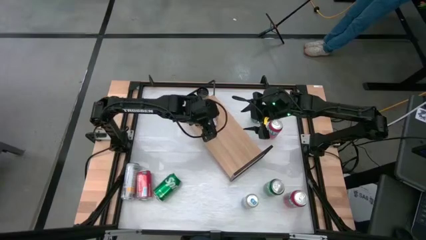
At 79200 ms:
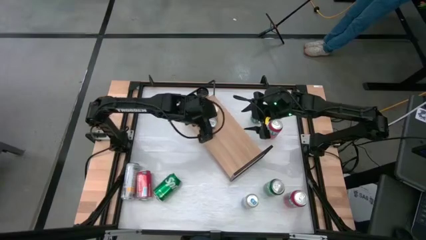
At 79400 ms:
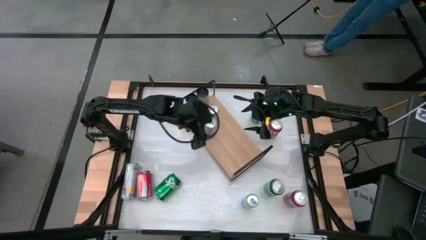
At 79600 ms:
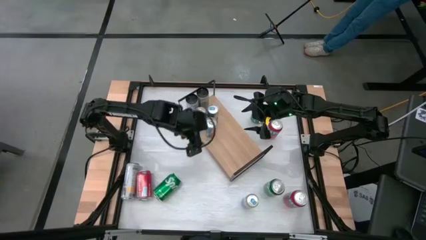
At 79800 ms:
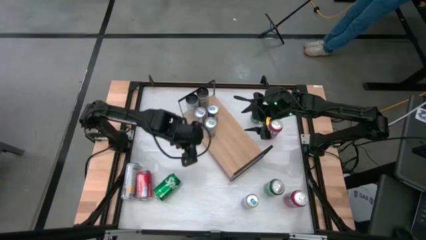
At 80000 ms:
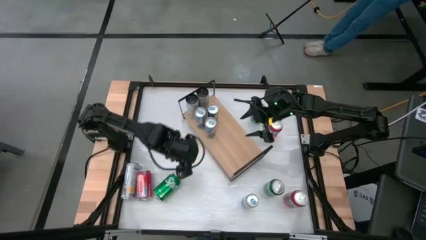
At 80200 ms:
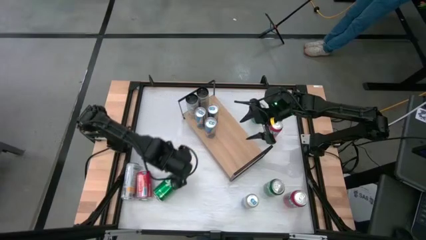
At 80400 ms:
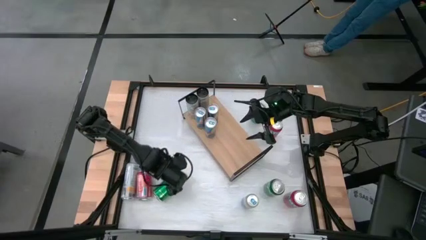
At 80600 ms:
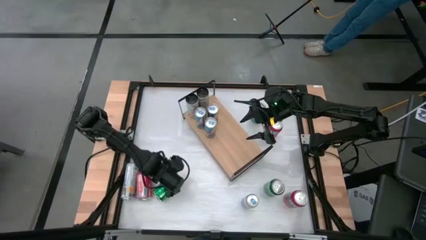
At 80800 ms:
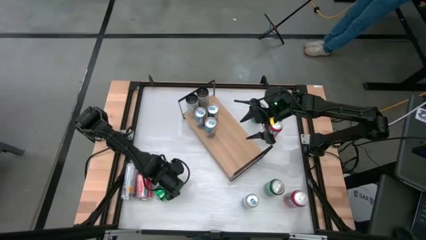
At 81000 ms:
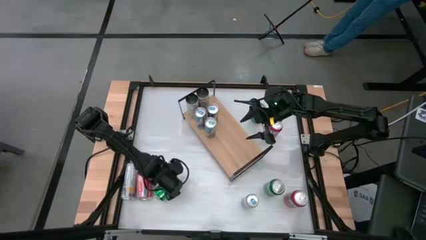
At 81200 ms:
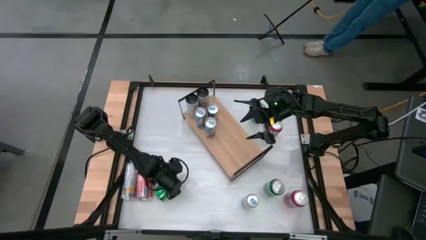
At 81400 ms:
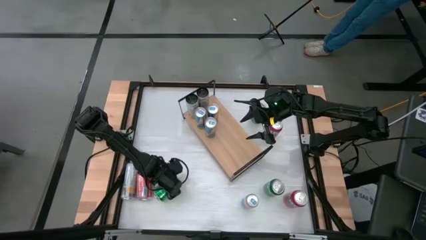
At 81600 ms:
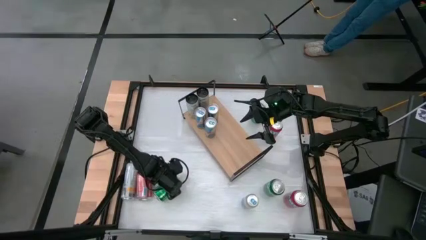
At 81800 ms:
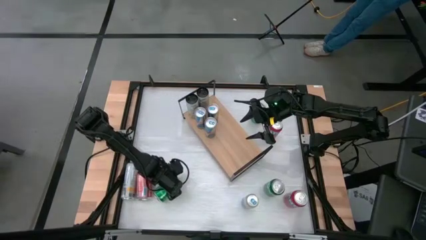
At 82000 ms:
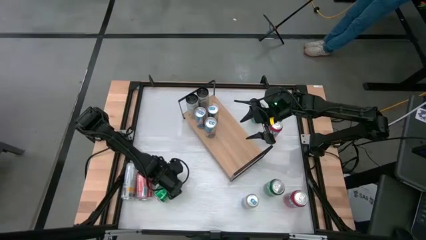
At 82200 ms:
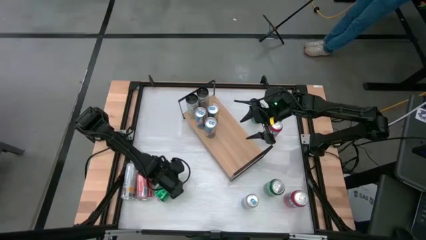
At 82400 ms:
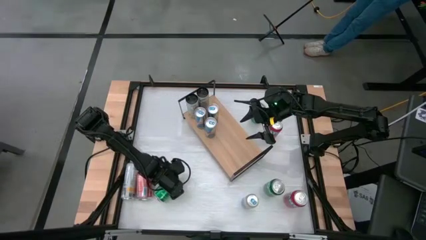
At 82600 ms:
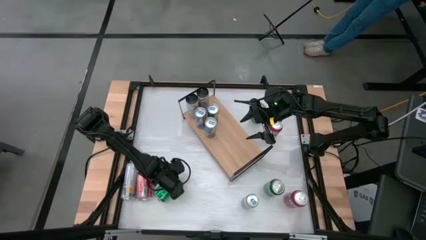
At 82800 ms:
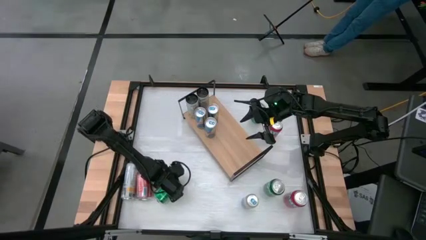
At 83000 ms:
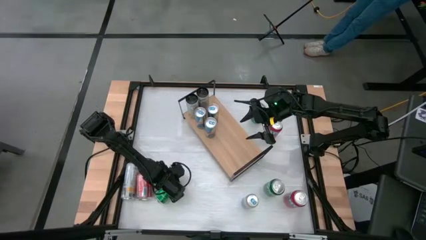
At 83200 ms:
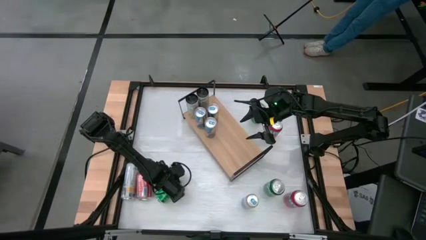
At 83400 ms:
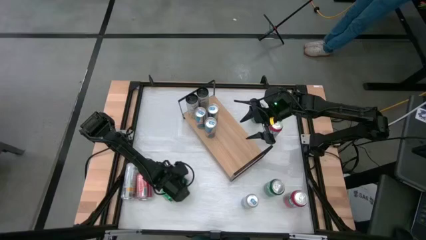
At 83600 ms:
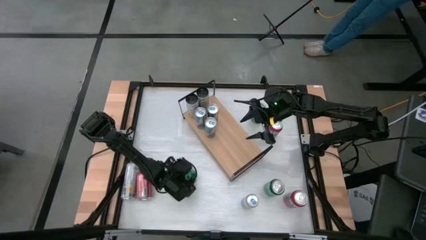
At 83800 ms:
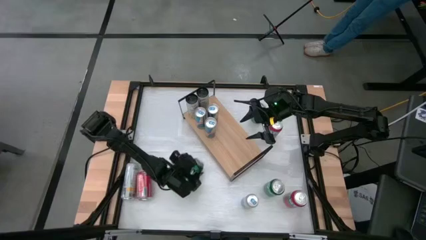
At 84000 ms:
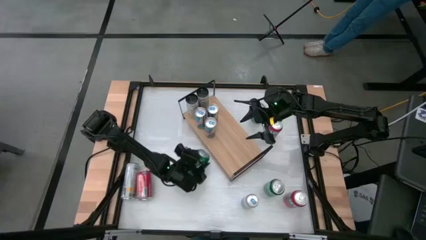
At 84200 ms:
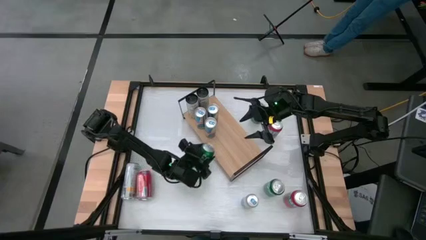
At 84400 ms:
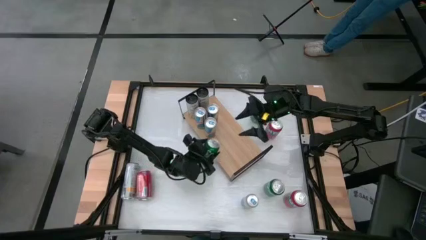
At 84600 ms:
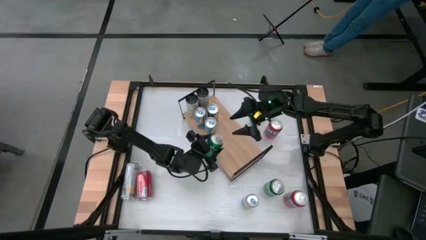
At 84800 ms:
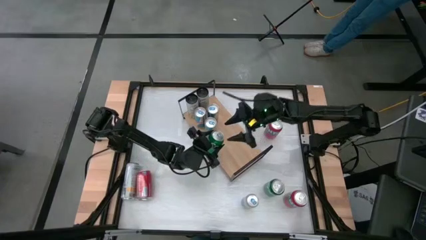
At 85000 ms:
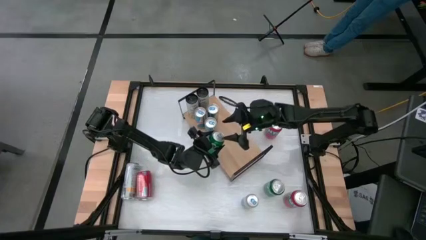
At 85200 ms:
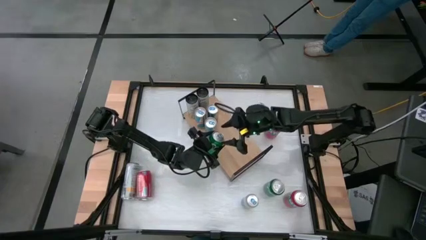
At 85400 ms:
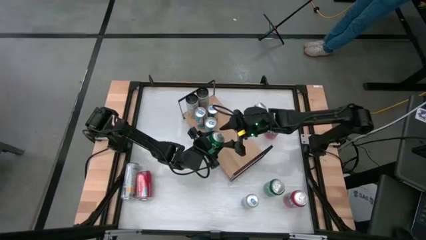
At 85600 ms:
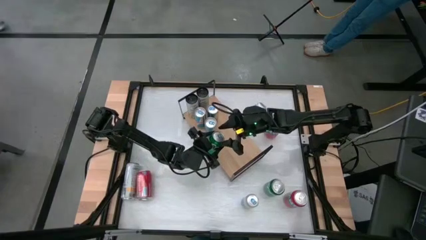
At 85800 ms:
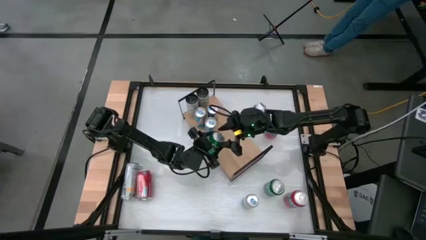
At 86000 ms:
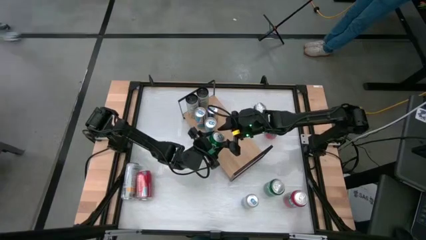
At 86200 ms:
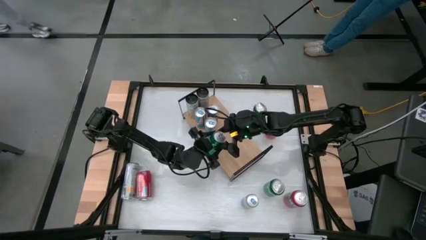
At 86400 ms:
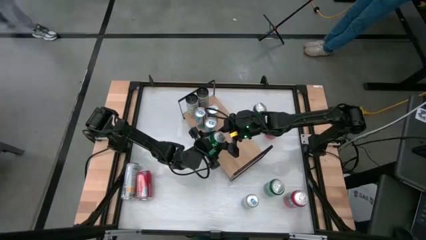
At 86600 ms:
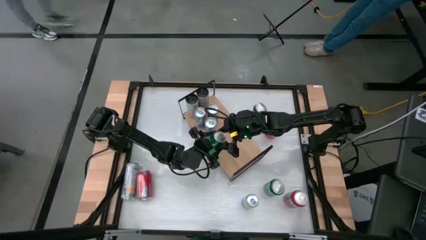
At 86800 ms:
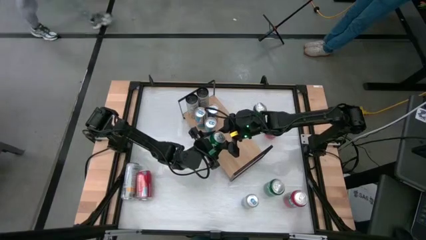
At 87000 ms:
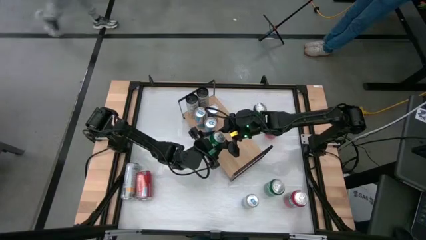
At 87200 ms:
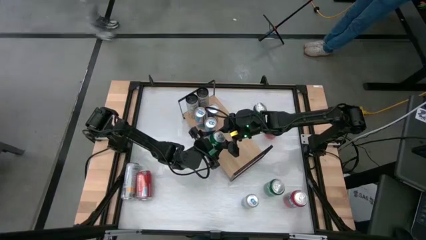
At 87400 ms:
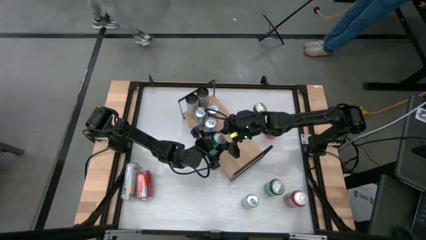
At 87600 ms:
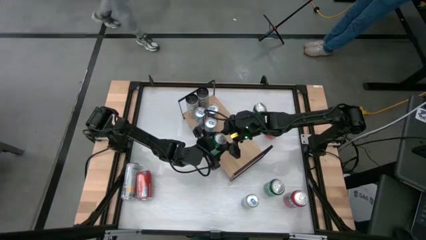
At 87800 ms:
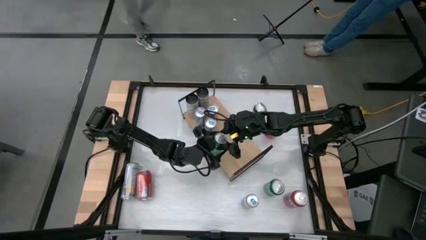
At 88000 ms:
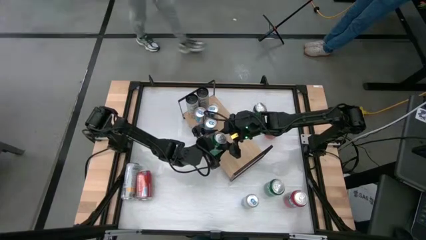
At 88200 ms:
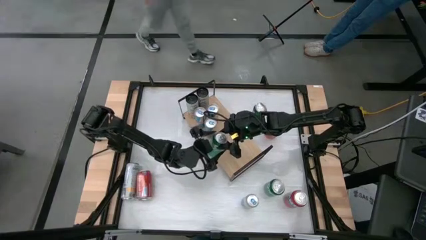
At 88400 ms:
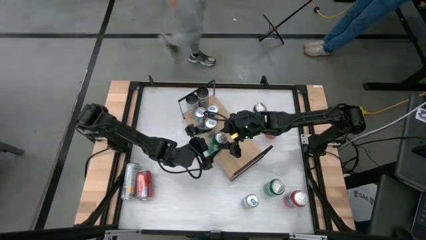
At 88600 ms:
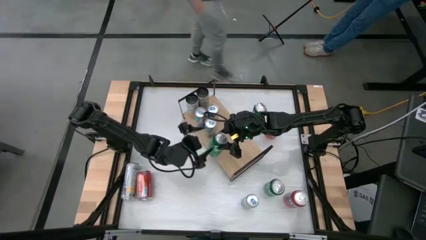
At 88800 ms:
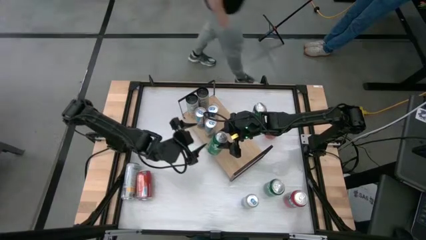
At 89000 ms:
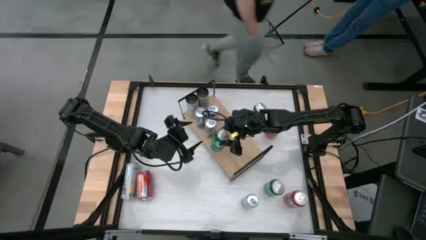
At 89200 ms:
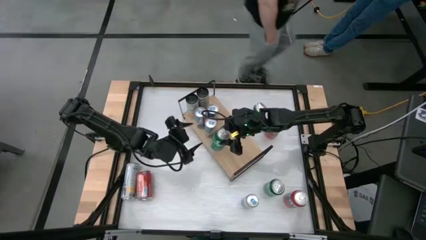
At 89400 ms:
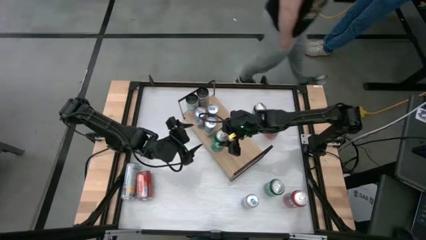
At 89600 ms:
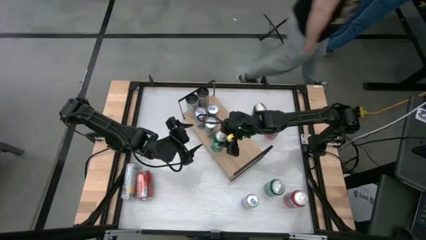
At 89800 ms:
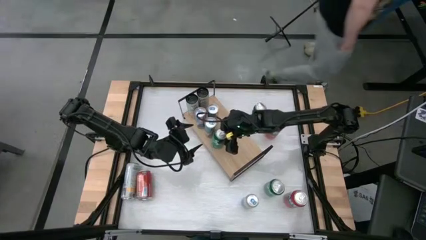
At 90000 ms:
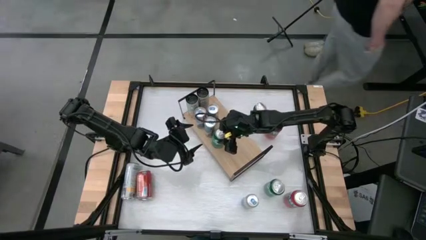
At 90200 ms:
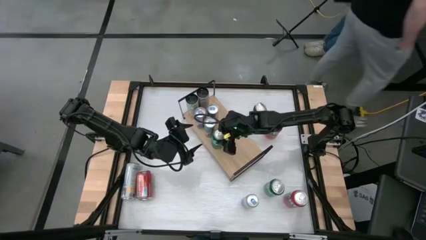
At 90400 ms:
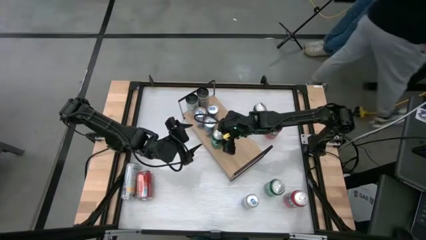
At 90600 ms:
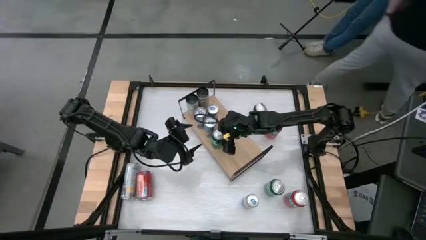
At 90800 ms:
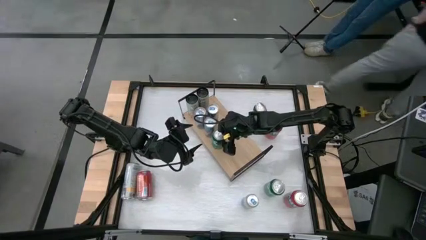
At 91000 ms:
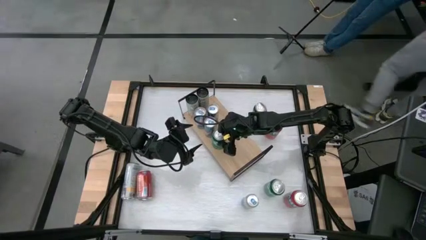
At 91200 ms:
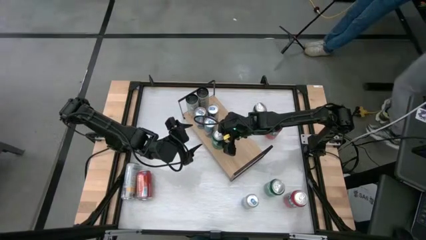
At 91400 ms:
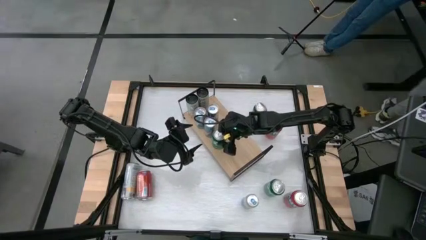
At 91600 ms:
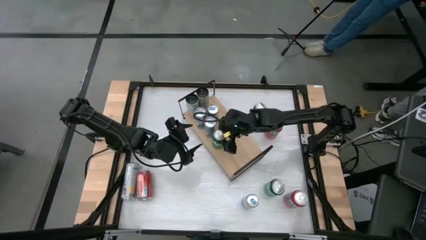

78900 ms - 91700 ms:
Task: Place canned beverage on shelf
Put the bottom left green soda can on the shelf
